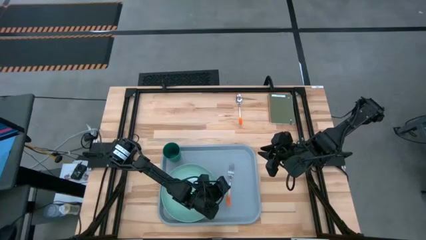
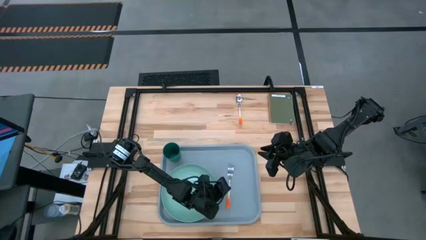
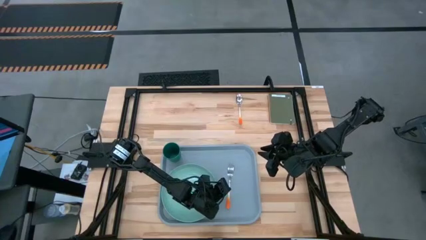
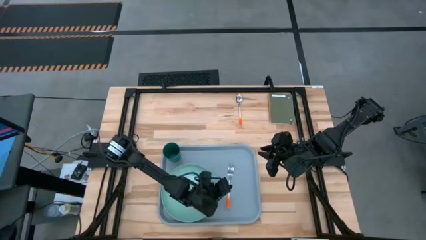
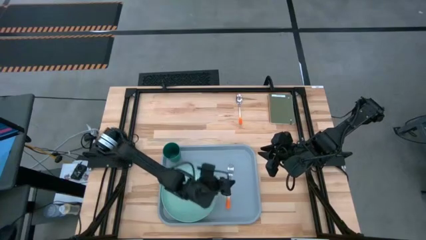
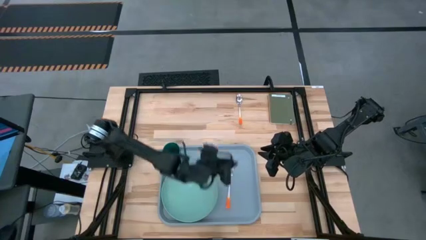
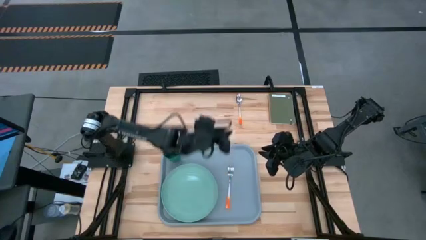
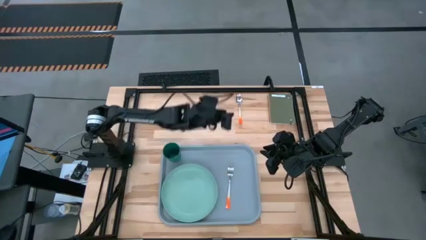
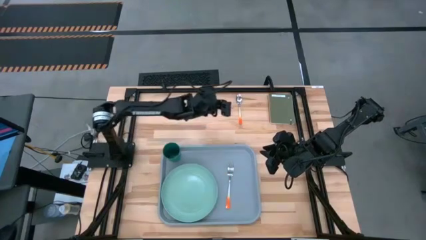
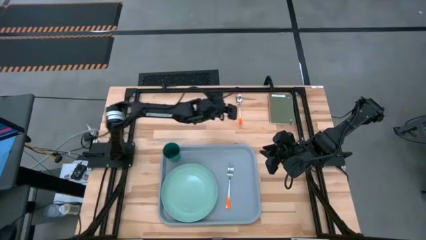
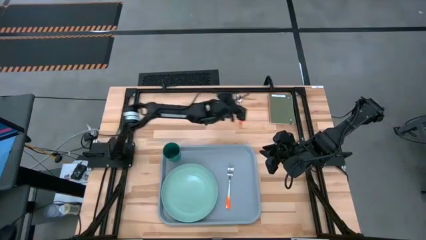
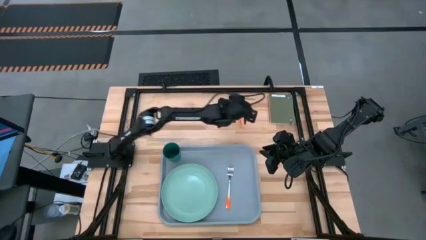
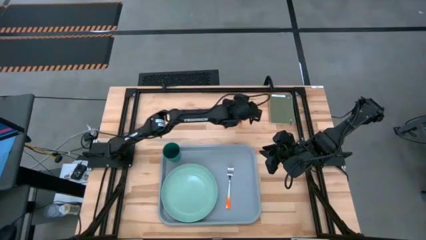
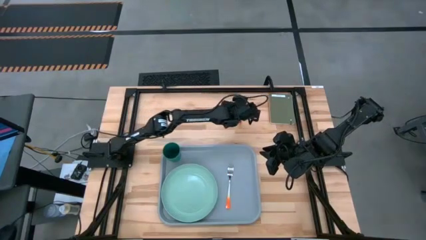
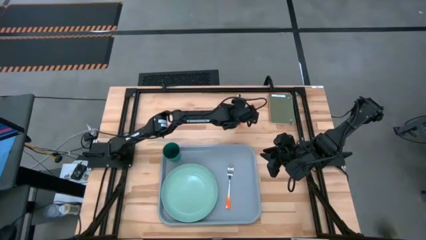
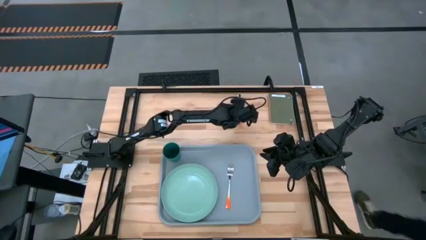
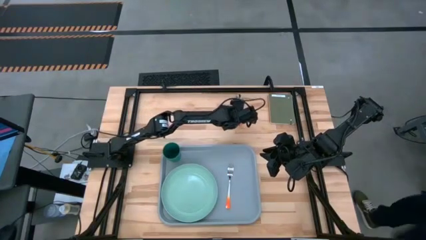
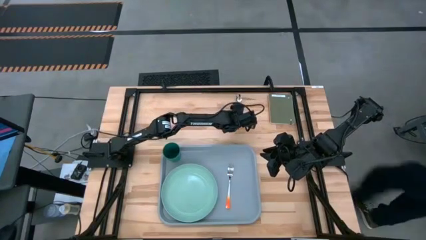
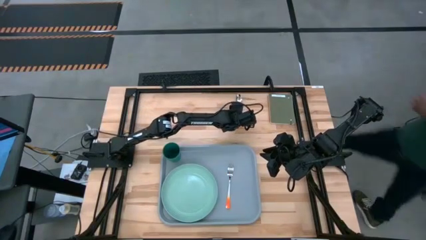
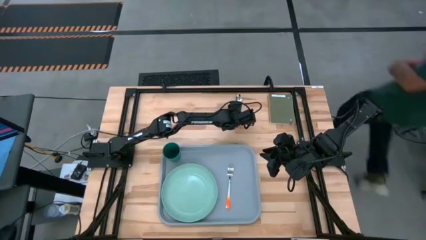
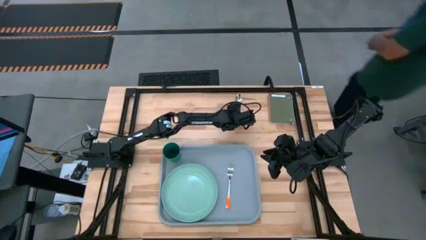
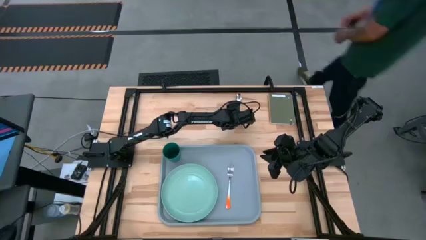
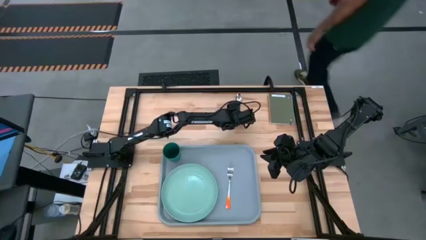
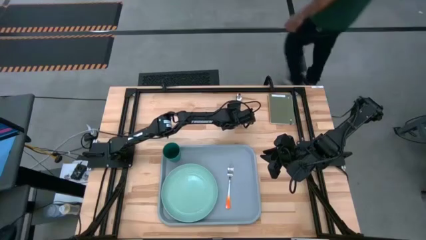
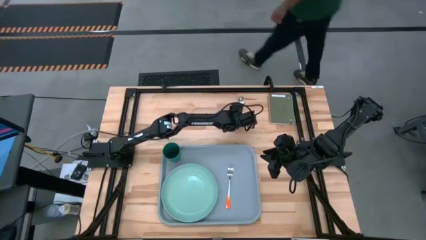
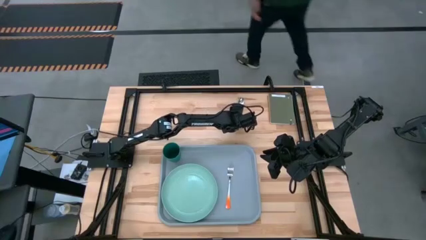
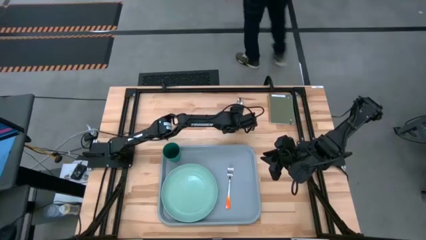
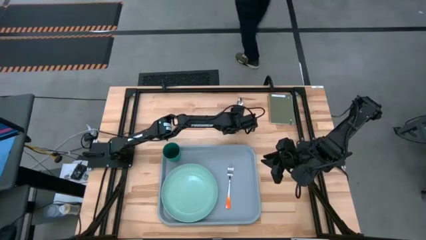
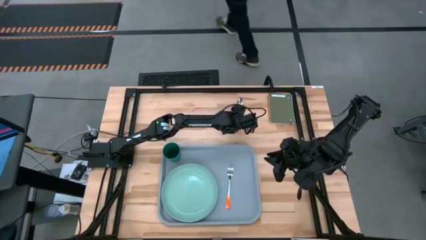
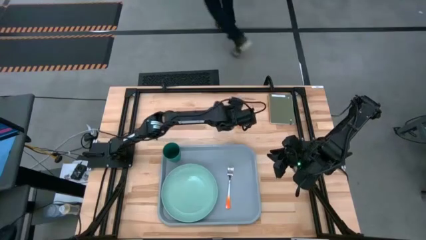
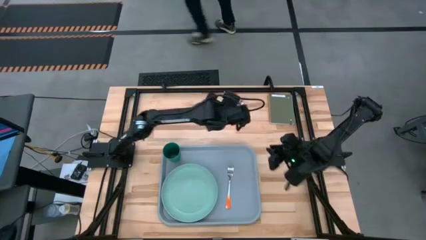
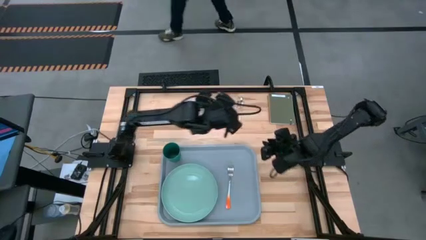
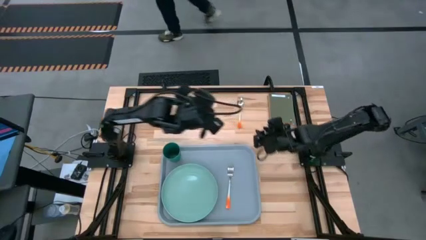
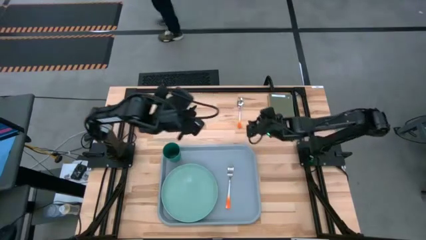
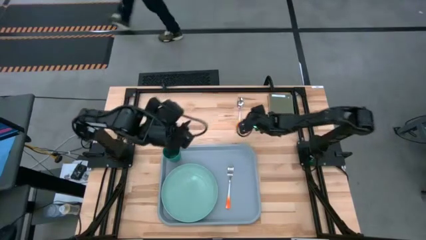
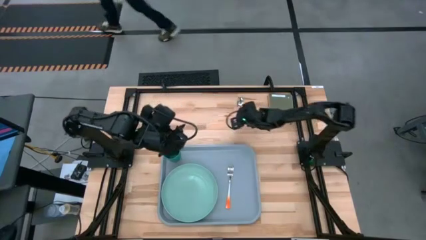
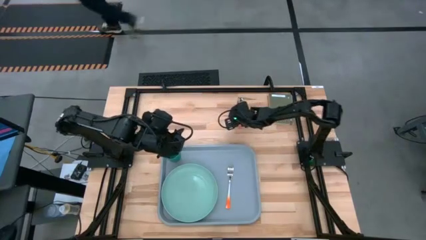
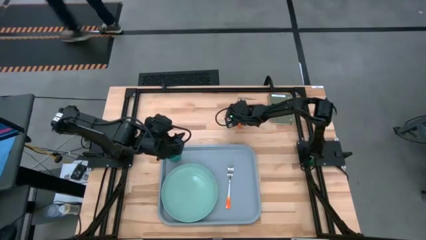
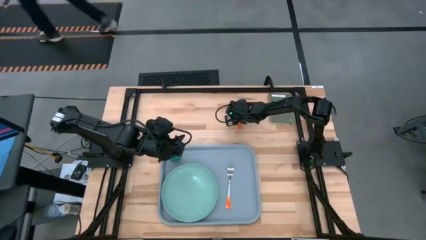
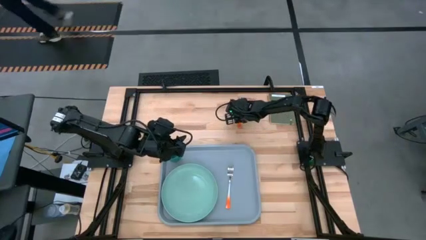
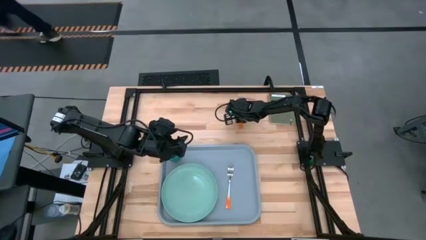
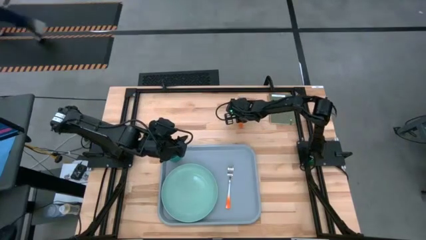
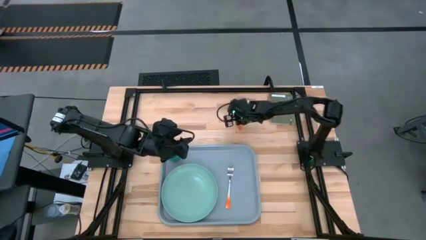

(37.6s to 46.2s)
Task: Pick and place plate/cup/fork/spoon on tray
Put the orange spoon to the right side of the blue plate on the blue serving tray

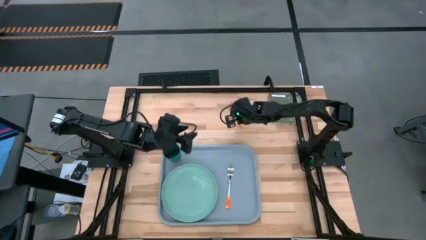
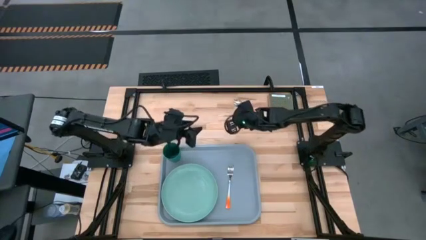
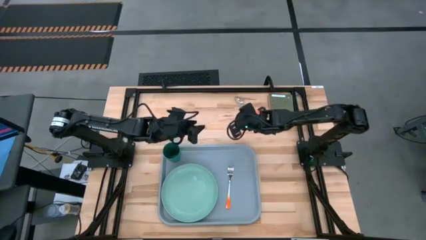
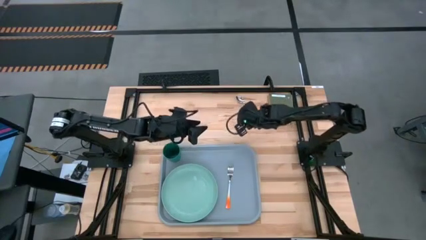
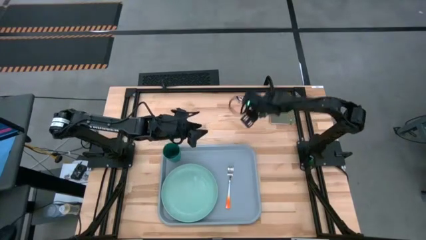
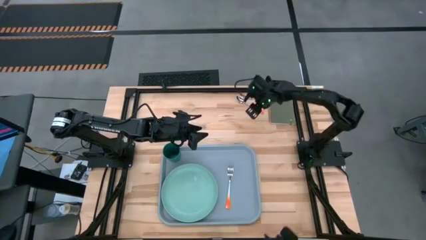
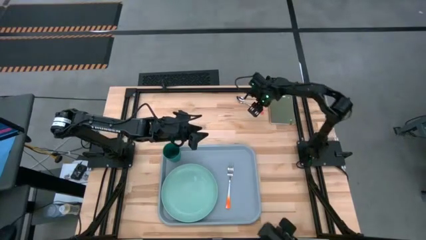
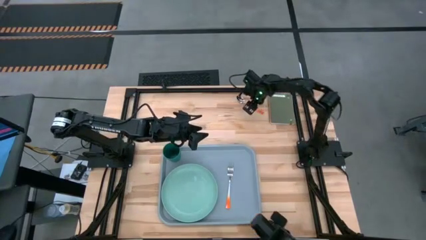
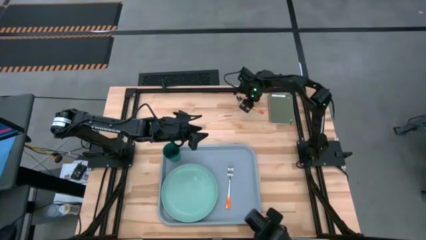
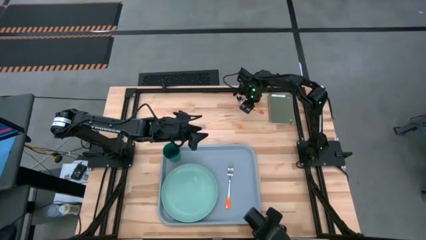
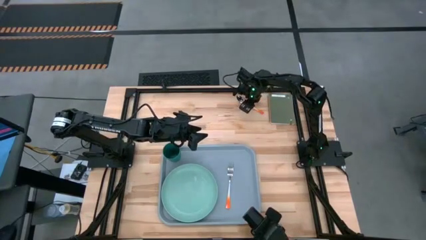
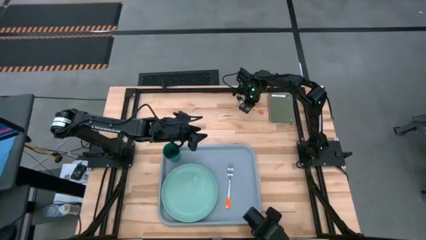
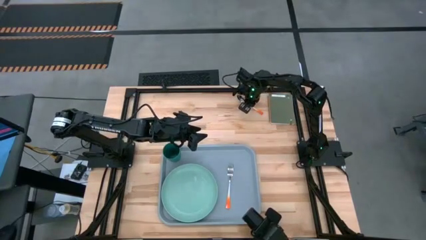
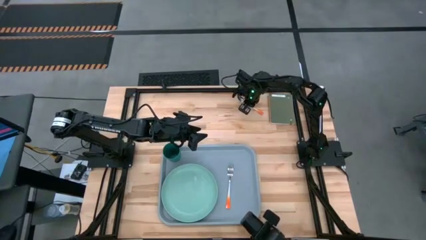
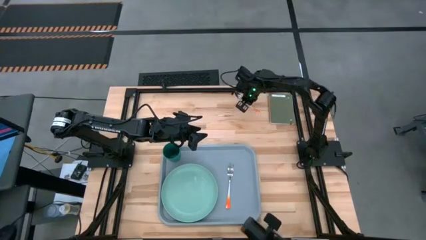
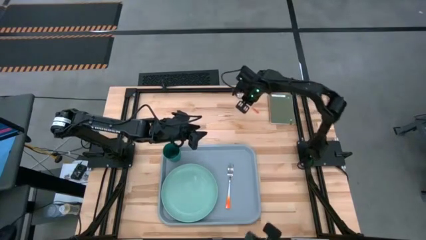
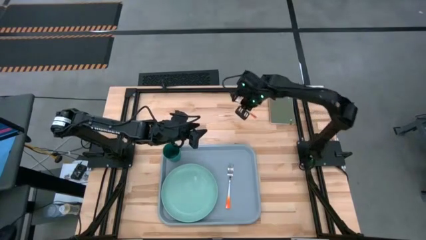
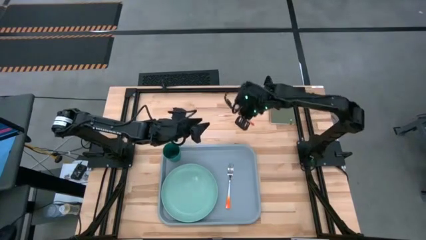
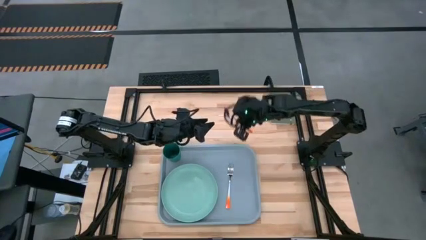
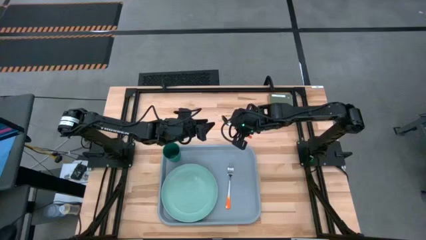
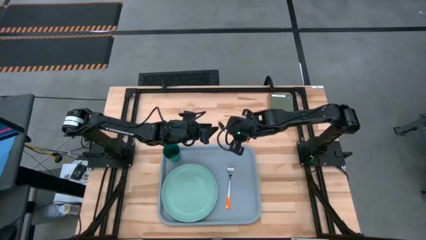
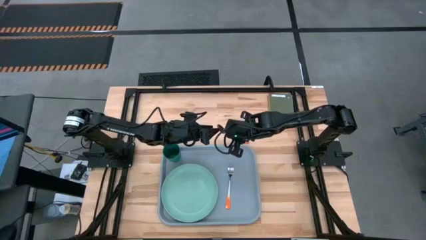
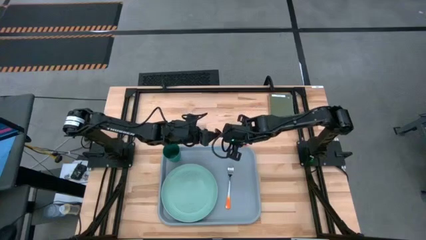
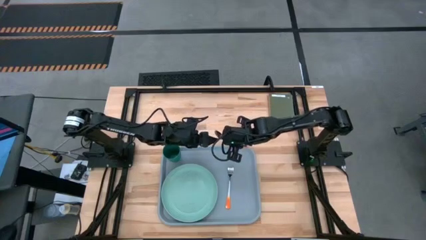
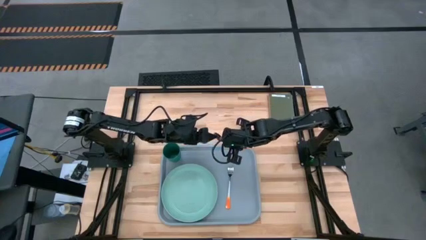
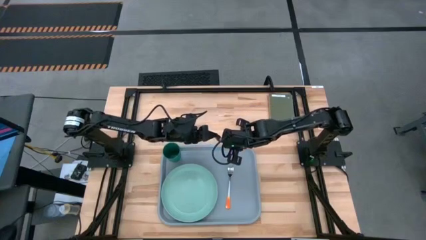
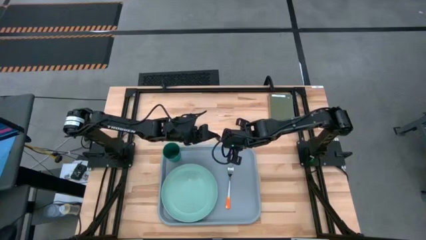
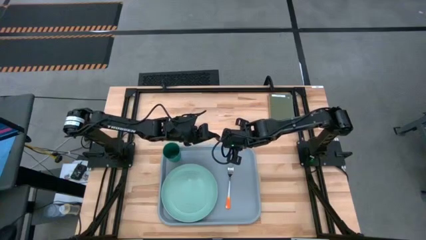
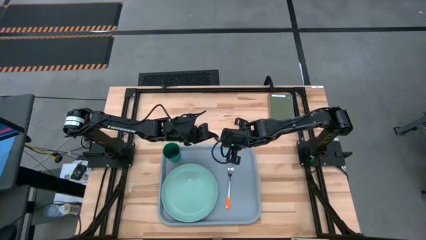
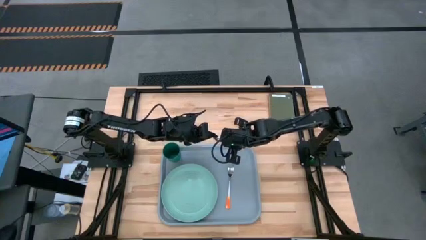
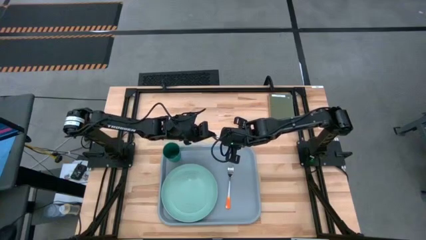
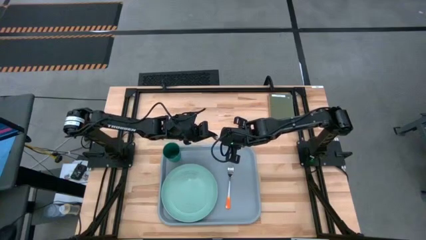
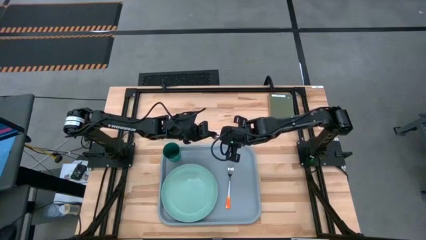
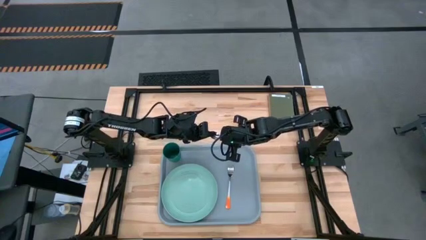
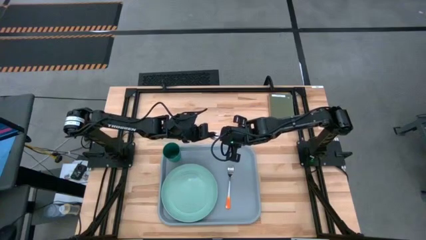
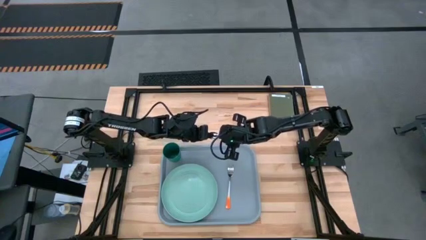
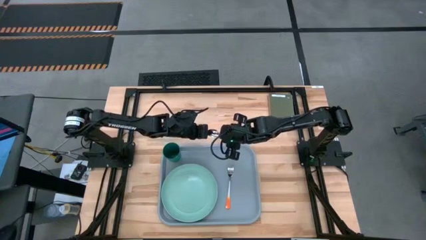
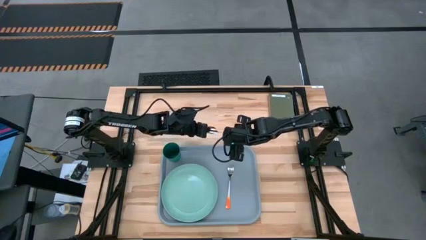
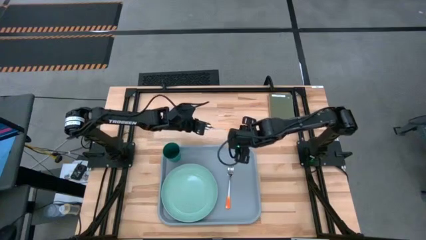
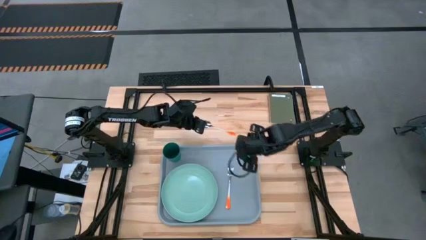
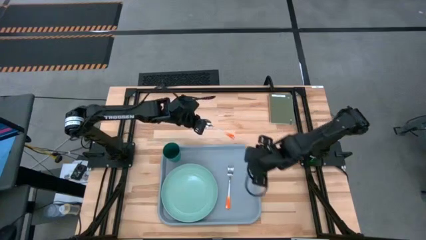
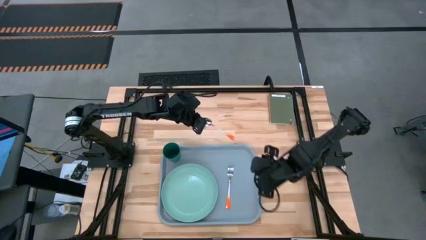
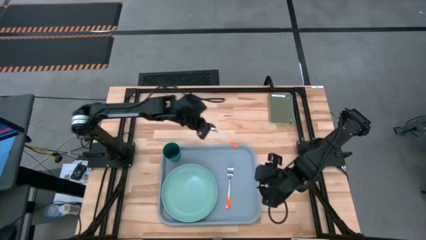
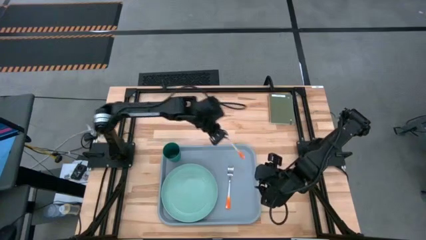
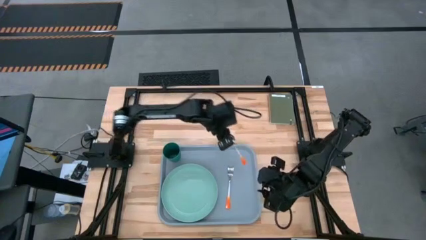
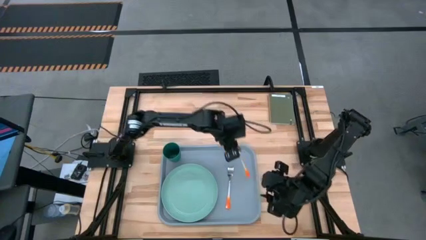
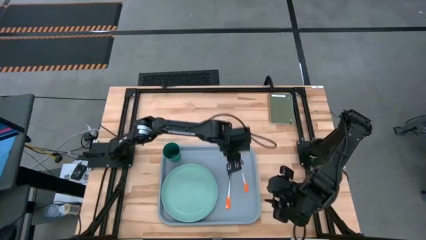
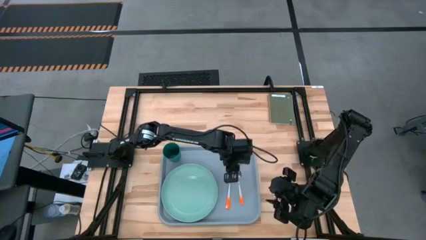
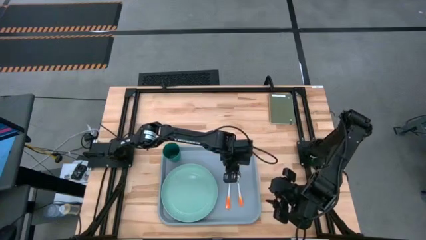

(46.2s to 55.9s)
Put the orange spoon to the right side of the blue plate on the blue serving tray
